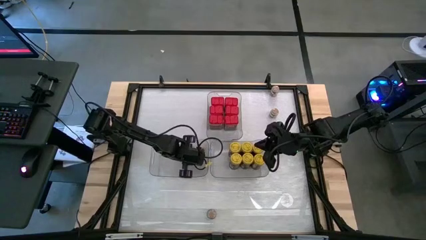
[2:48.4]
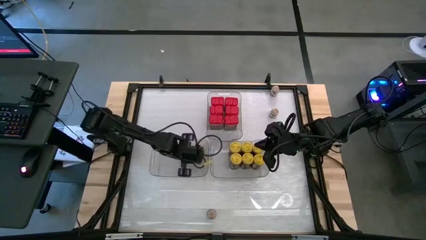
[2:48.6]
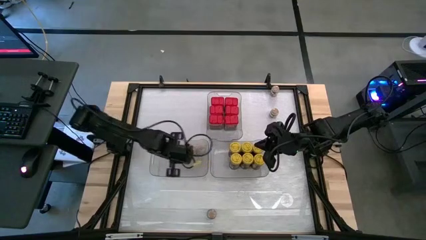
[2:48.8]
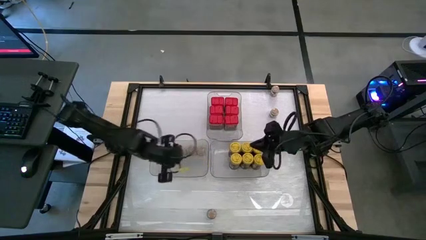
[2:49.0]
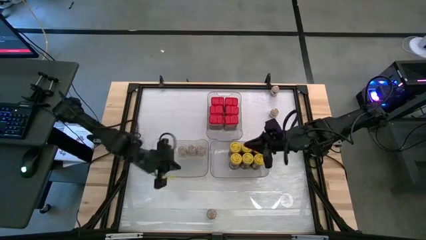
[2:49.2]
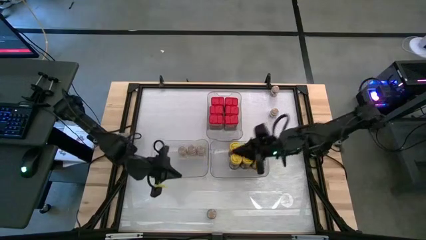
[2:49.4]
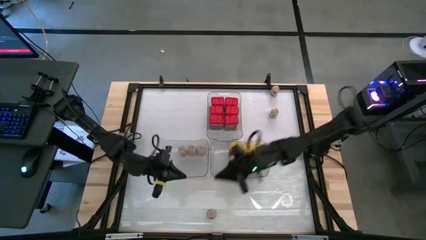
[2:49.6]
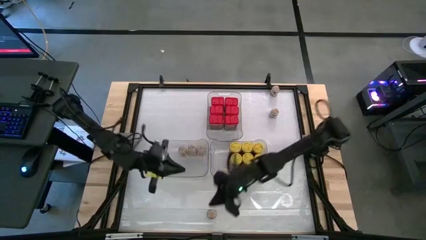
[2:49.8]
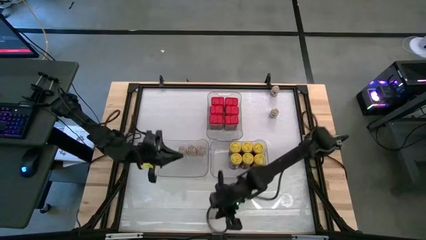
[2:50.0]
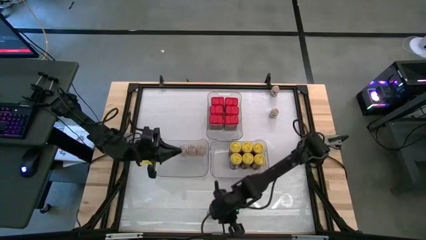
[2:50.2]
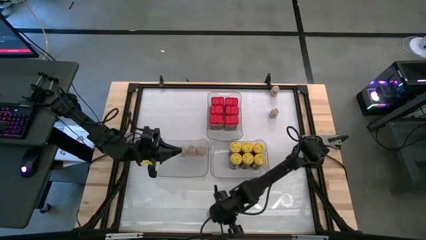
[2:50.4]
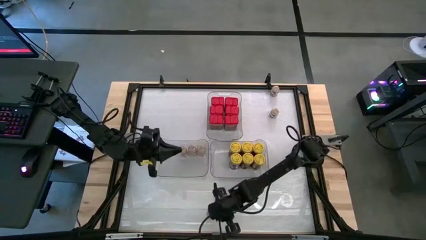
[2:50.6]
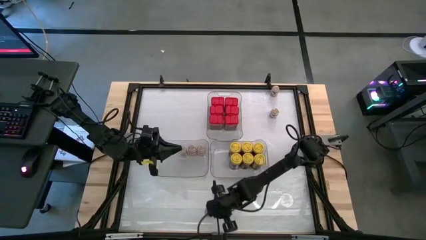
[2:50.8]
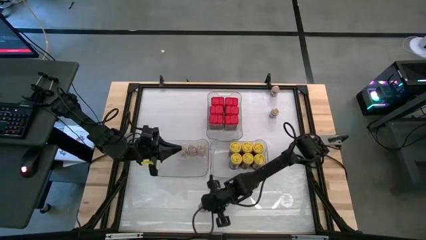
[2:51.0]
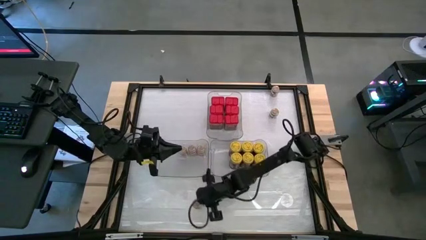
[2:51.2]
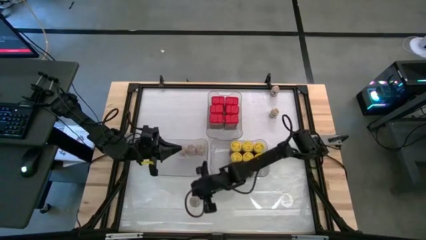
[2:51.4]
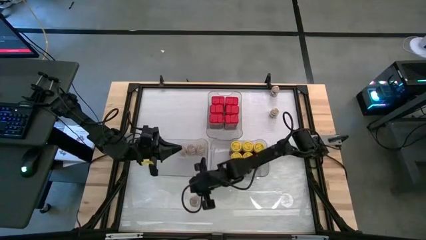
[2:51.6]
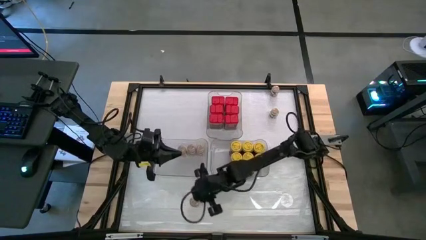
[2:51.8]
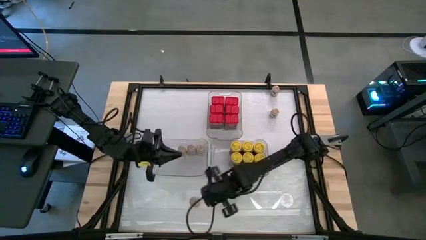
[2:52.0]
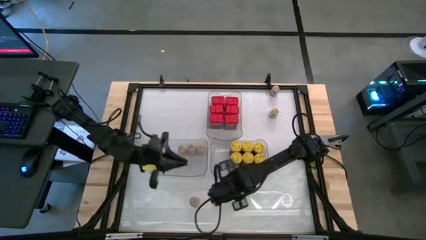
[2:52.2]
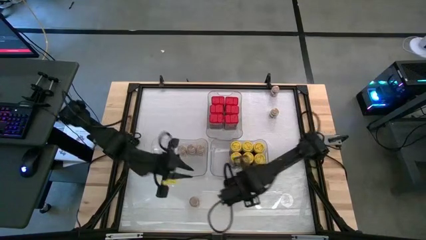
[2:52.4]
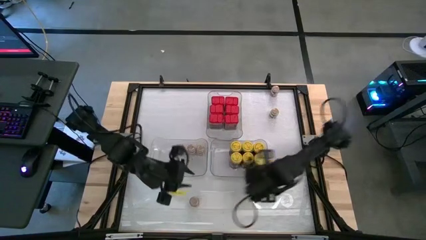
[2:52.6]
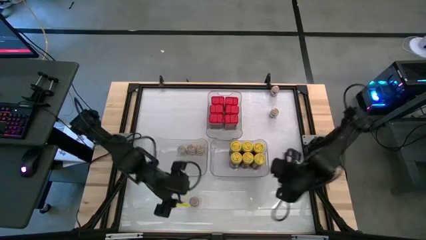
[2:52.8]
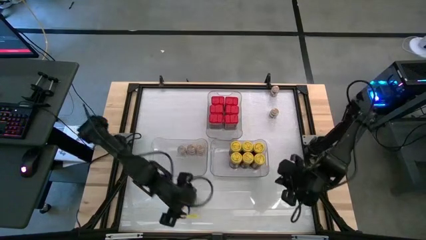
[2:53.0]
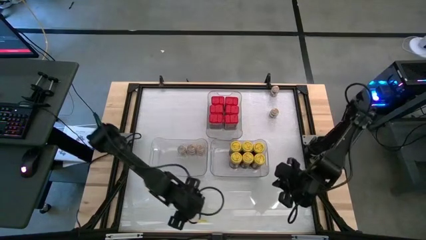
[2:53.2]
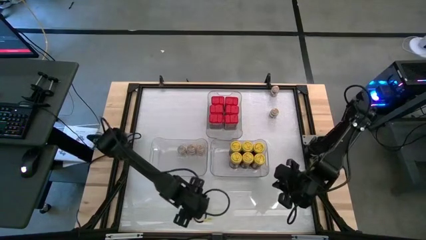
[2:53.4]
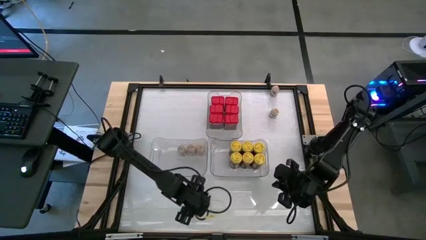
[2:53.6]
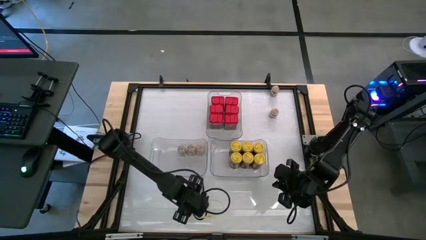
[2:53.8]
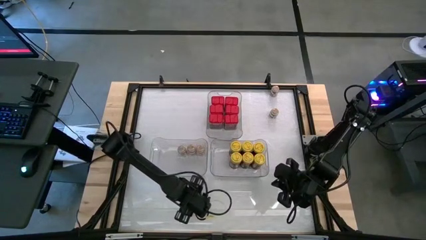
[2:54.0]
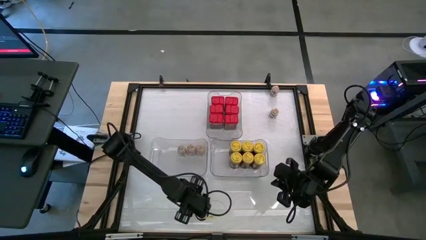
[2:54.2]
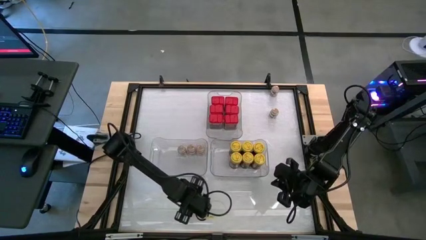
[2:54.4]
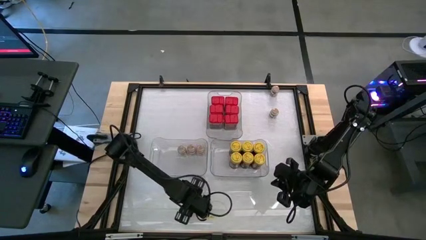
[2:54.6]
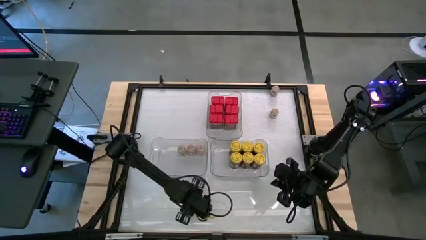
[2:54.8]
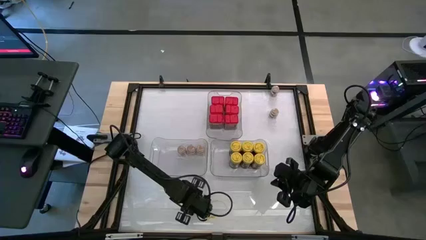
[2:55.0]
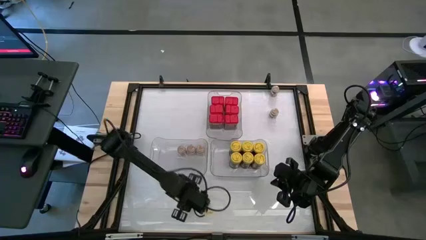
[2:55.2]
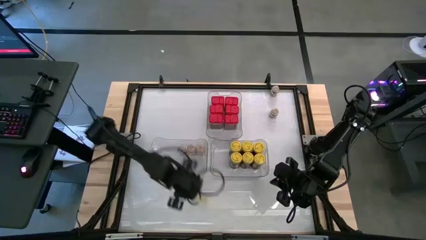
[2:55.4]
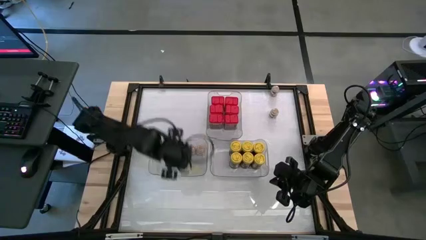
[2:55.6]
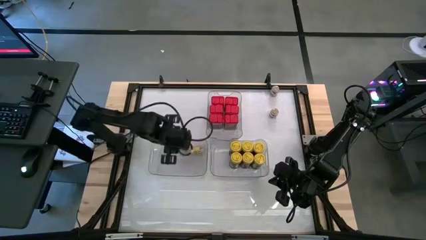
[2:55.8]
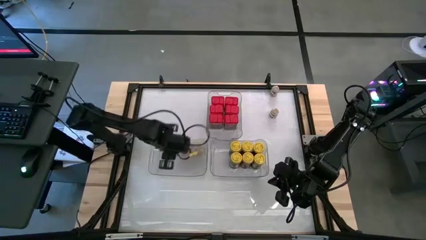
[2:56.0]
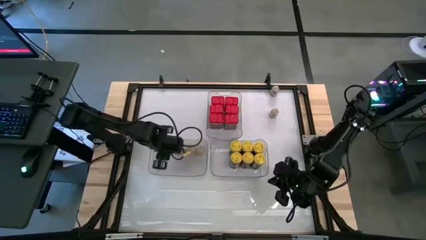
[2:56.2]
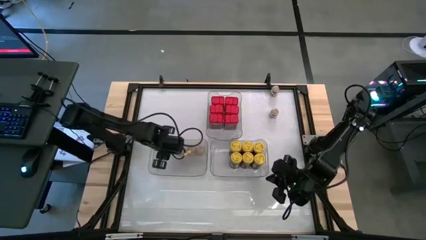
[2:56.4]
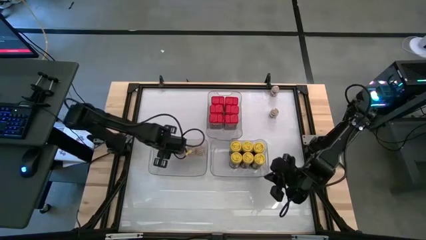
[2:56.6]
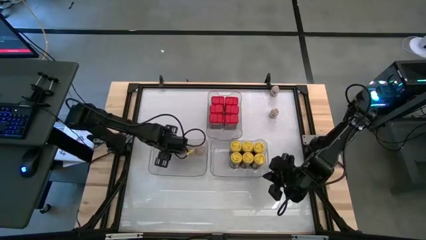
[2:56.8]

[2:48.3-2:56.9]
Task: Sort spices by type
Put the brown seasoning bottle into the bottom left transparent bin

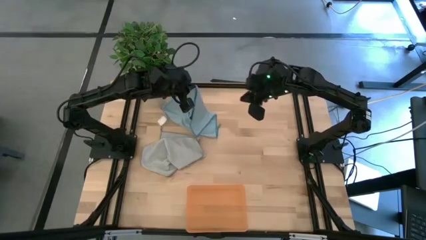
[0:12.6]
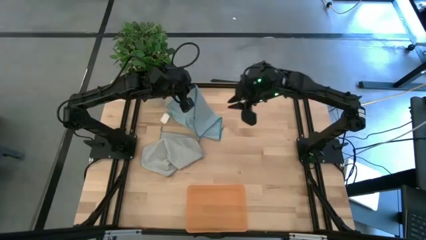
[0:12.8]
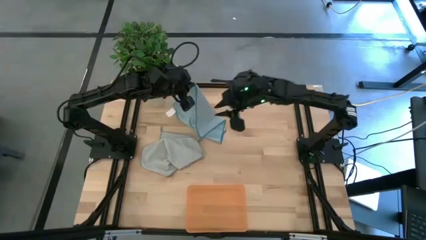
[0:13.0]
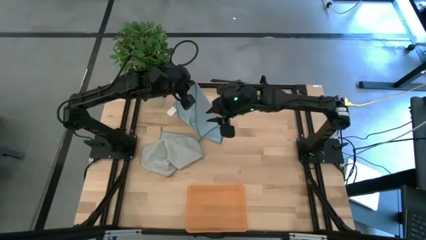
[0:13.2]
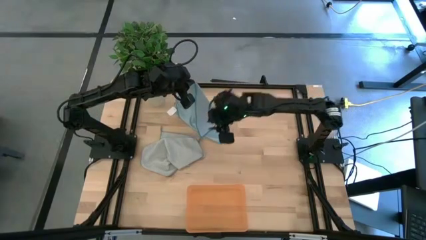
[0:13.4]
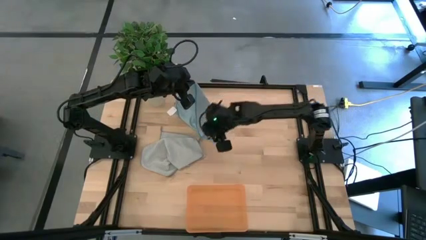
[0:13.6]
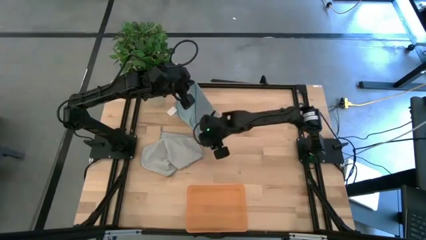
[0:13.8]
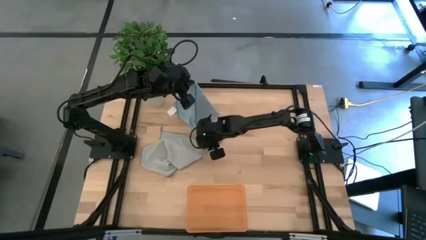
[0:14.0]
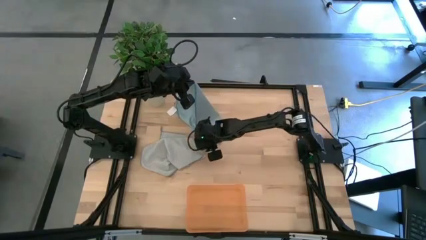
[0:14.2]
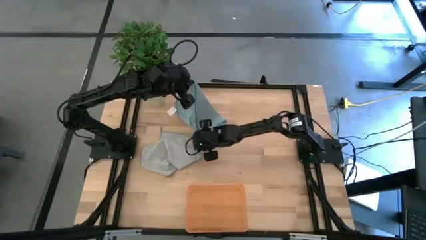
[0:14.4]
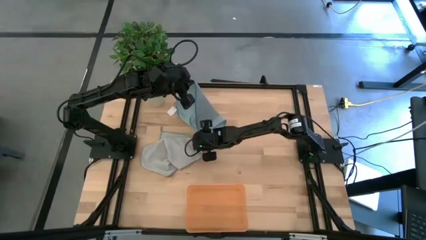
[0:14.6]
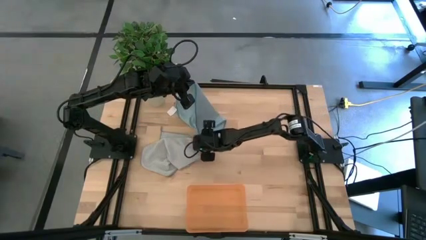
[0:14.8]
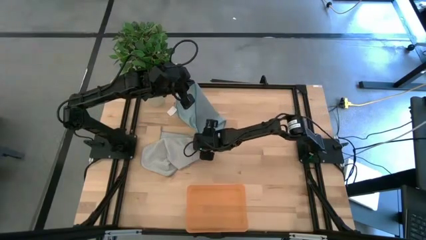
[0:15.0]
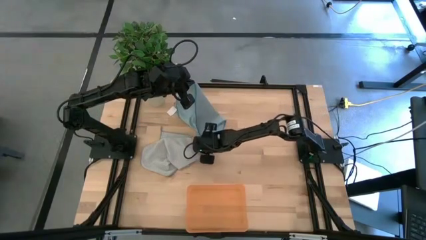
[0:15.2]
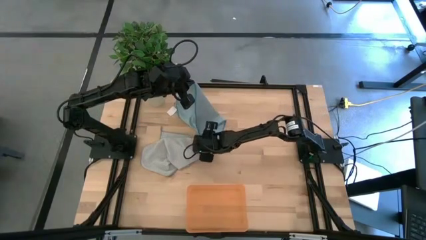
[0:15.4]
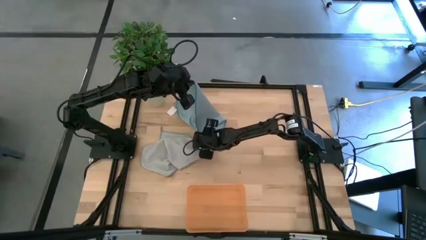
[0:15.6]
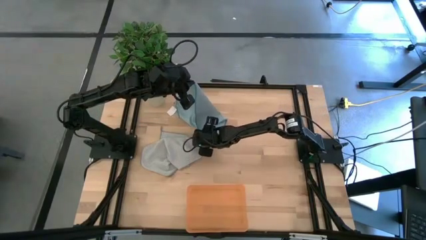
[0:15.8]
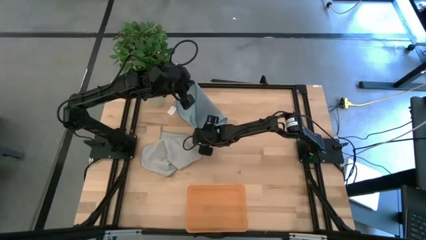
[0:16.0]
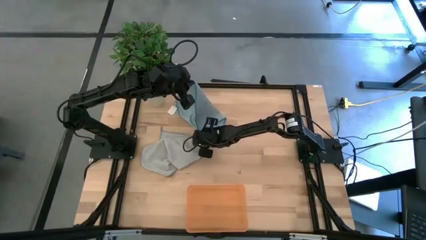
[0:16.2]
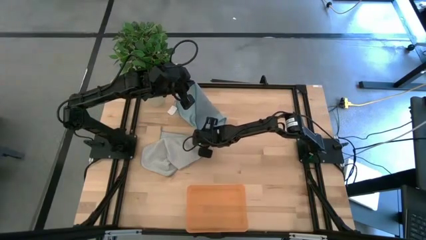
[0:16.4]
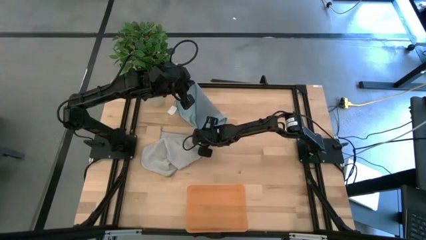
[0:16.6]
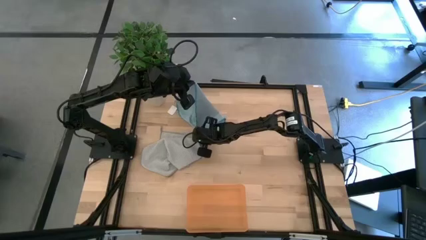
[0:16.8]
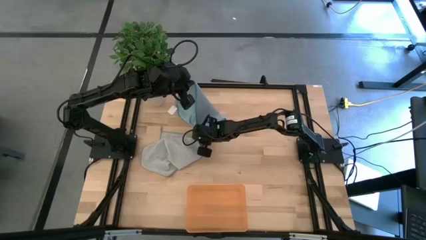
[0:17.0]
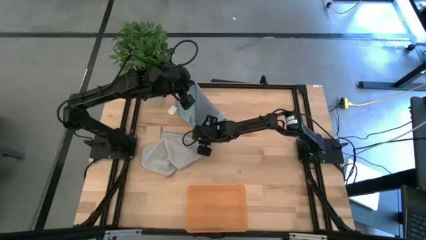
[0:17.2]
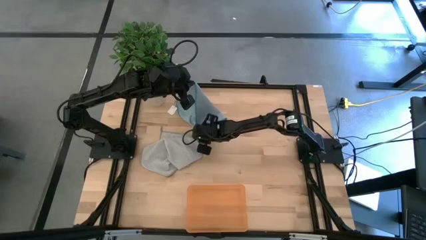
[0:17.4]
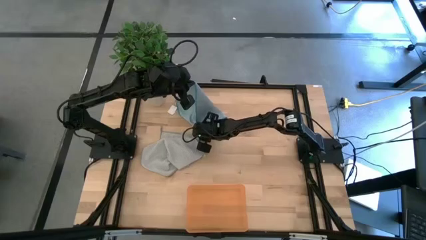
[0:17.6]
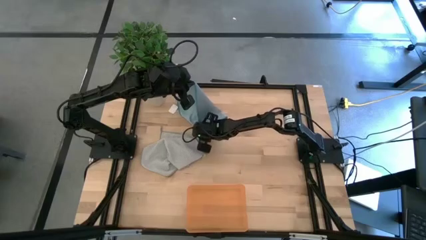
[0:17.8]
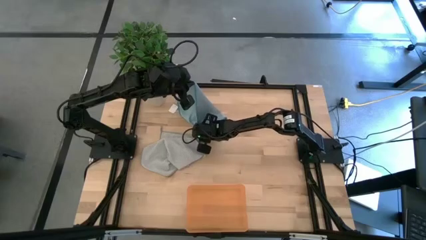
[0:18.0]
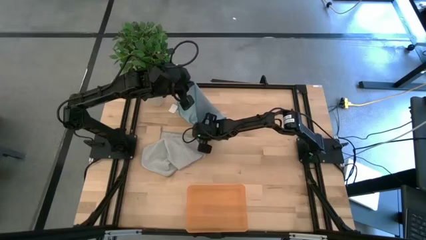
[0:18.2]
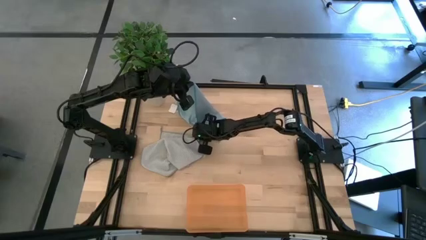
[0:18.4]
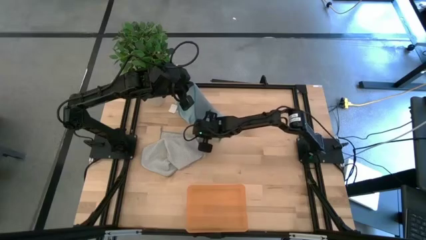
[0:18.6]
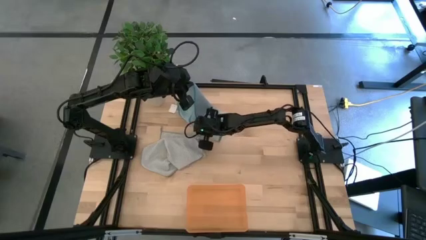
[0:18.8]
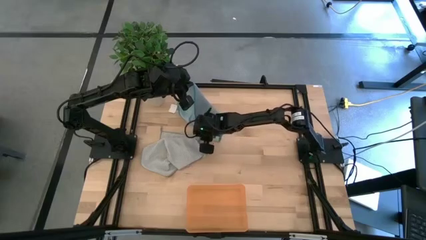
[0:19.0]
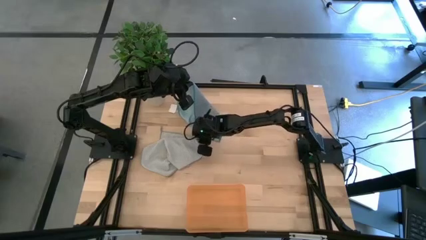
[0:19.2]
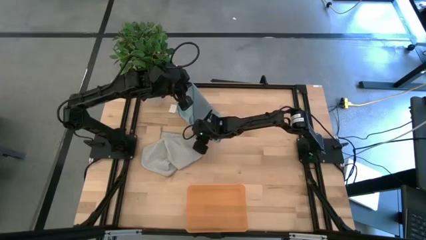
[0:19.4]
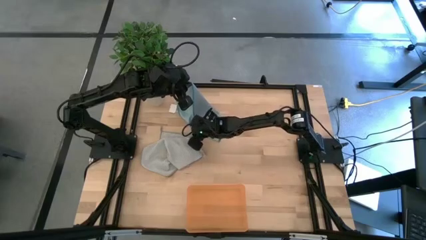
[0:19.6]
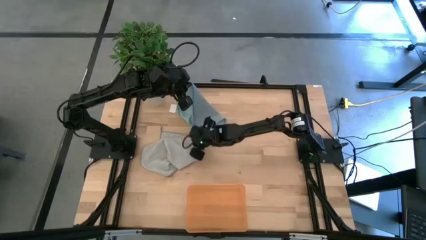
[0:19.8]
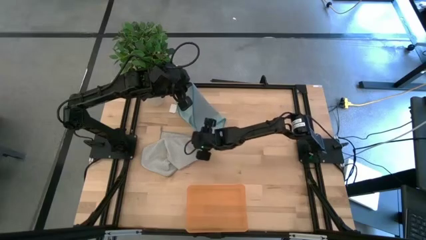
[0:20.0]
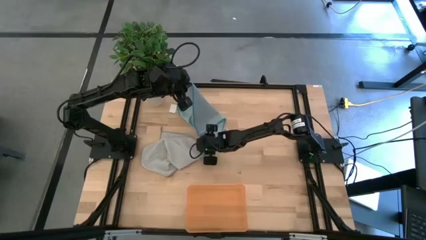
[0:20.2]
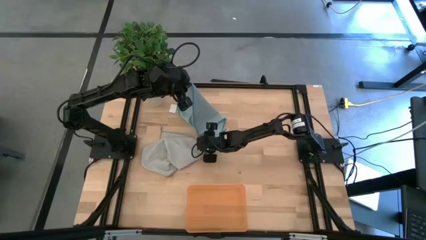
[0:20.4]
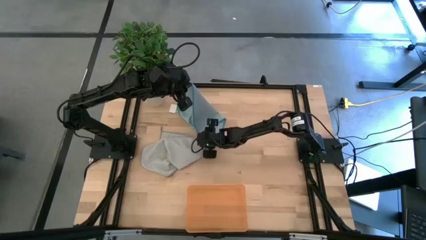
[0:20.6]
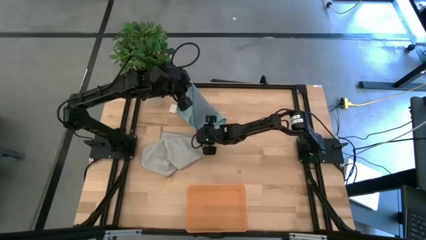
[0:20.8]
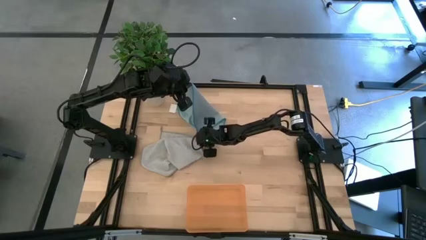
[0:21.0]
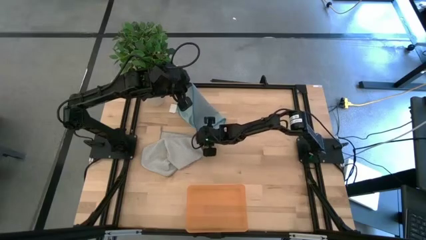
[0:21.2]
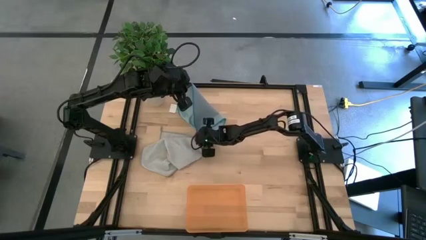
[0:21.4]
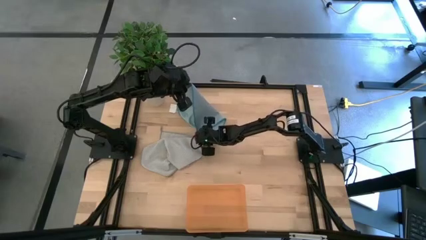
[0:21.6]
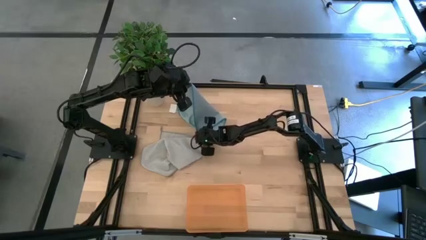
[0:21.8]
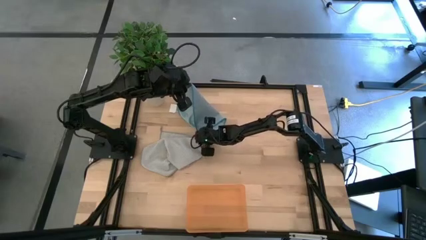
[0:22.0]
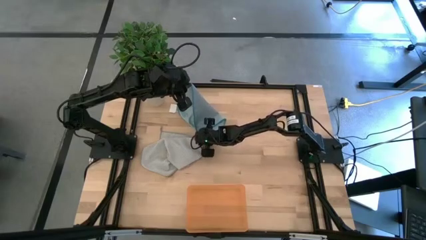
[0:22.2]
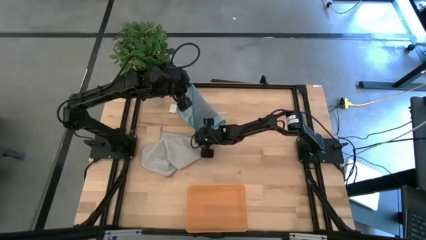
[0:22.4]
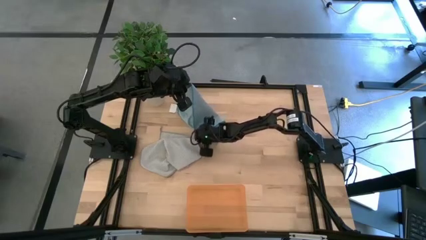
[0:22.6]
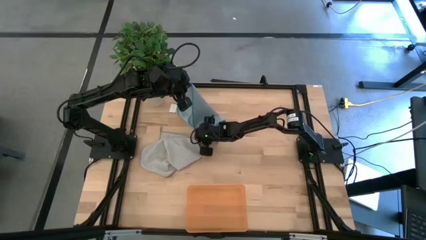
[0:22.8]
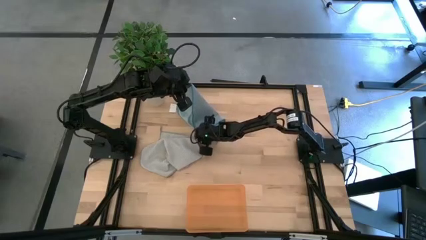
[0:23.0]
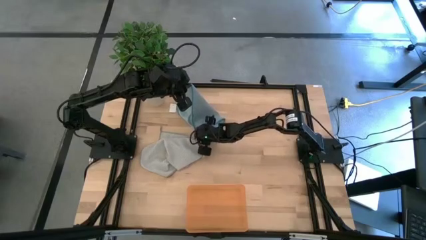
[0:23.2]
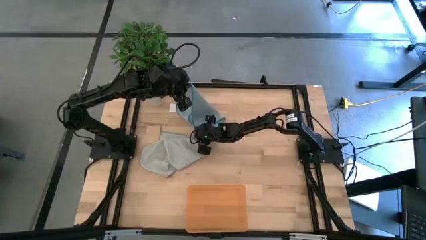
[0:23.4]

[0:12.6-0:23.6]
Task: Roll microfiber towels into tight, uniform cylinder then place into a basket
Fold the blue towel
